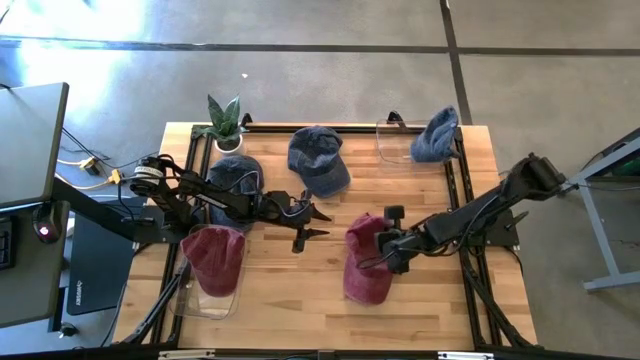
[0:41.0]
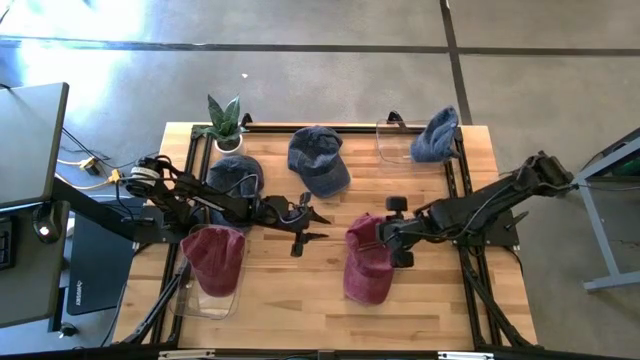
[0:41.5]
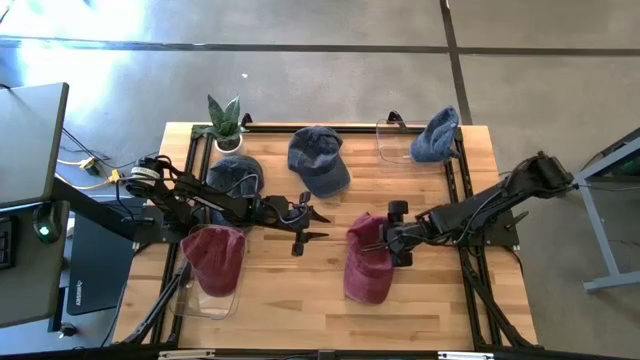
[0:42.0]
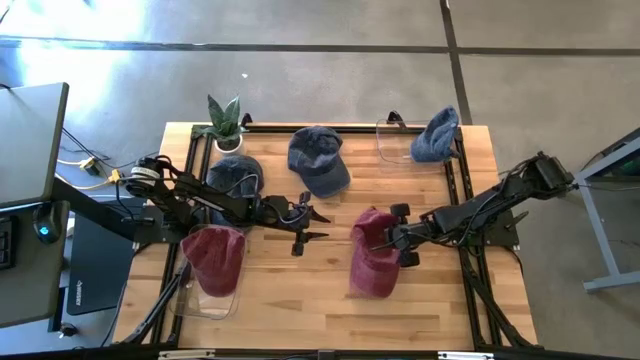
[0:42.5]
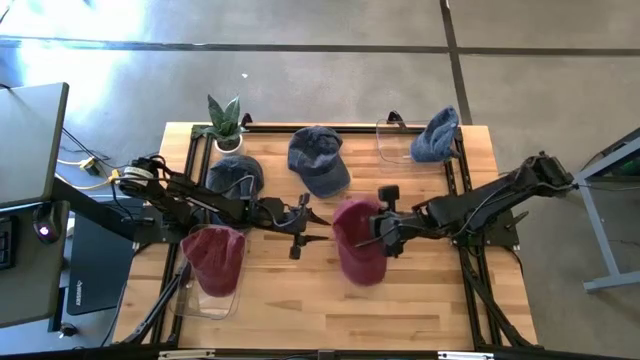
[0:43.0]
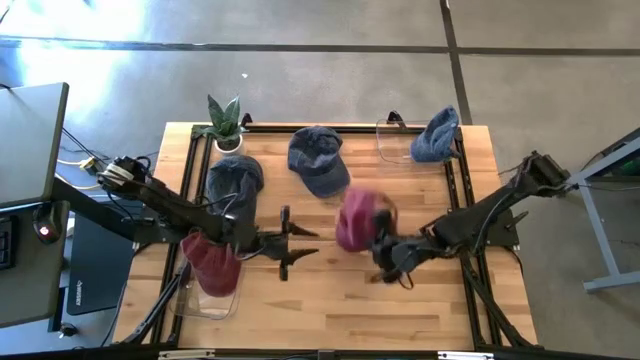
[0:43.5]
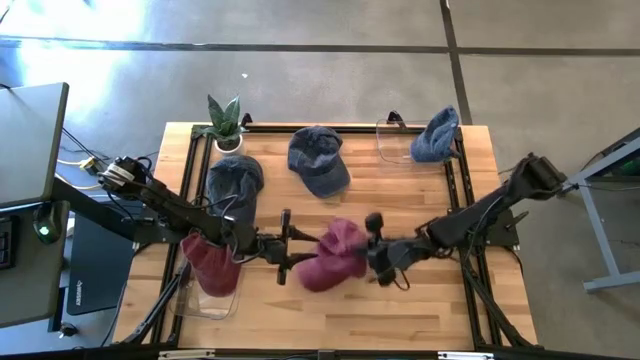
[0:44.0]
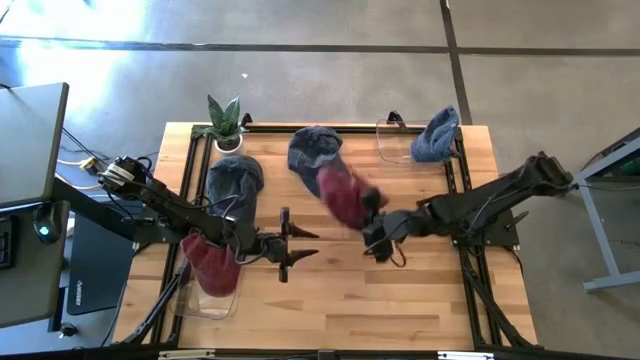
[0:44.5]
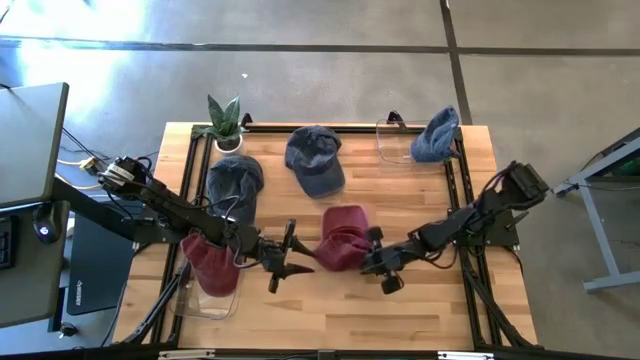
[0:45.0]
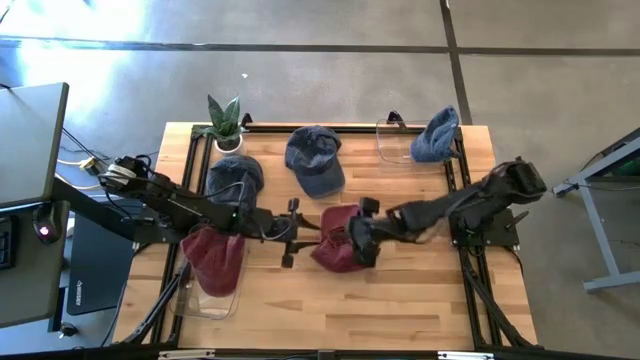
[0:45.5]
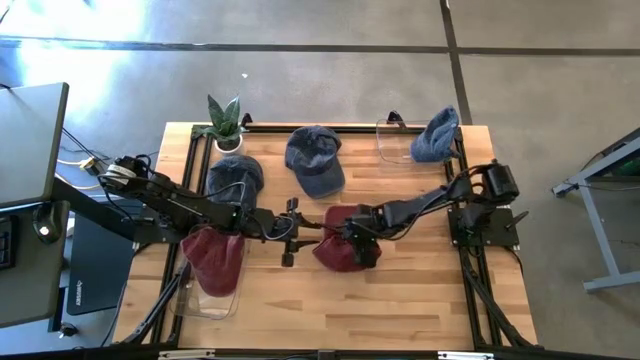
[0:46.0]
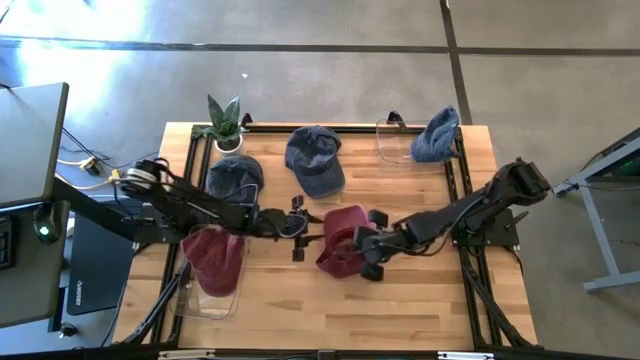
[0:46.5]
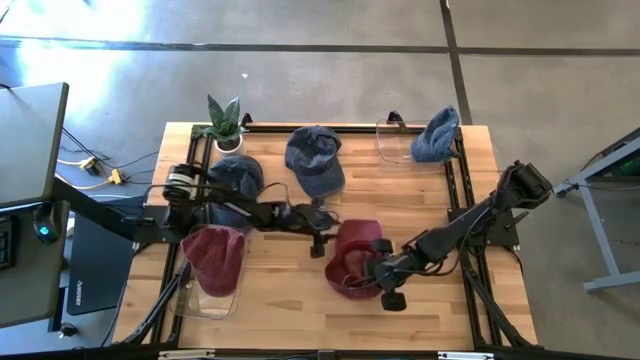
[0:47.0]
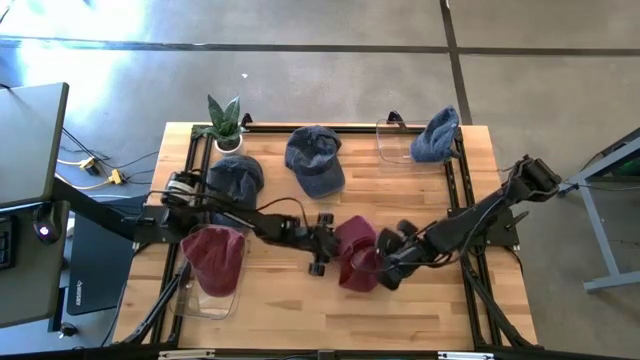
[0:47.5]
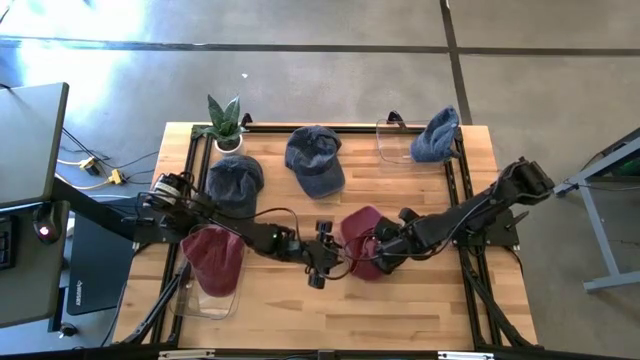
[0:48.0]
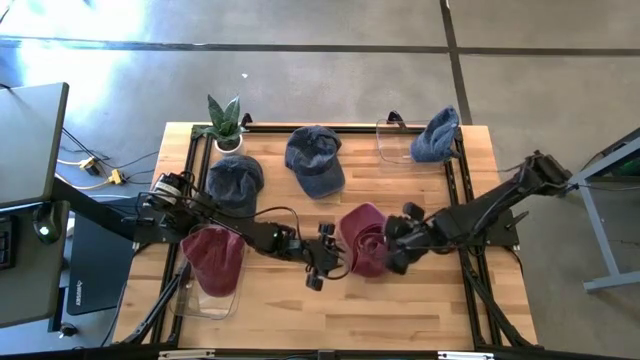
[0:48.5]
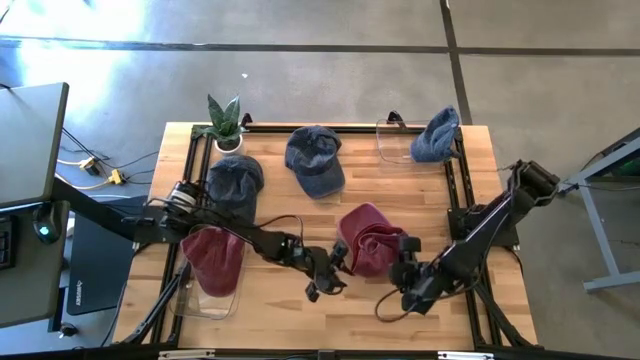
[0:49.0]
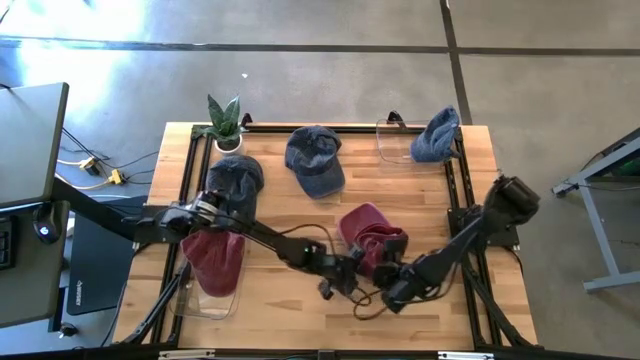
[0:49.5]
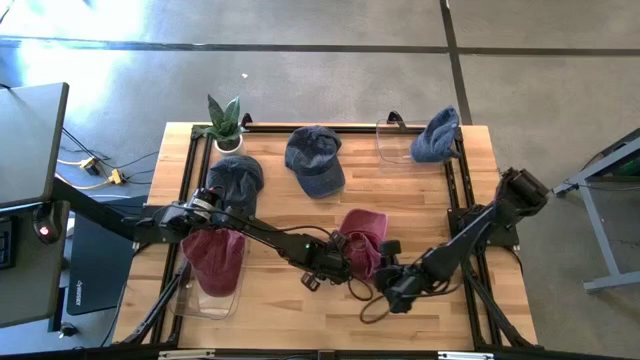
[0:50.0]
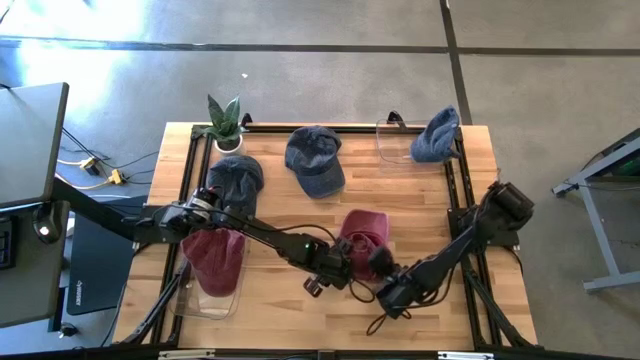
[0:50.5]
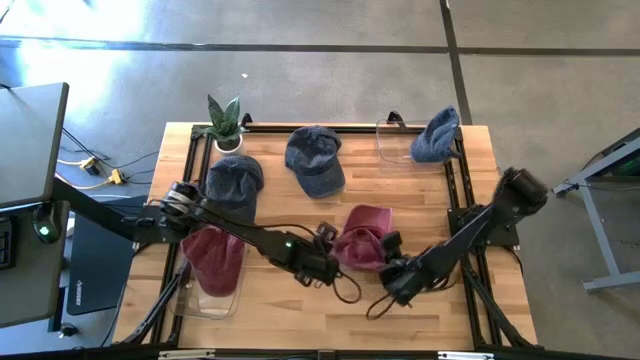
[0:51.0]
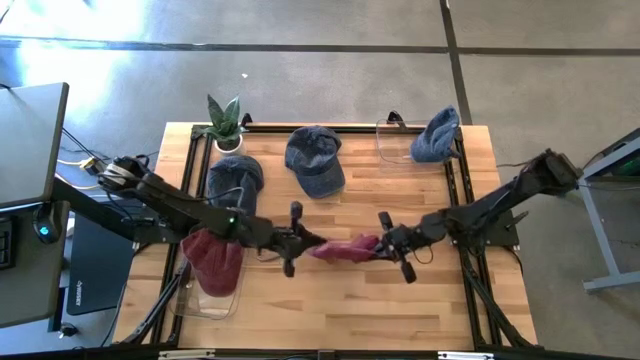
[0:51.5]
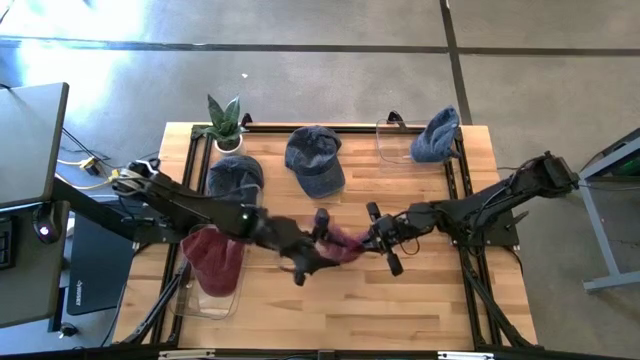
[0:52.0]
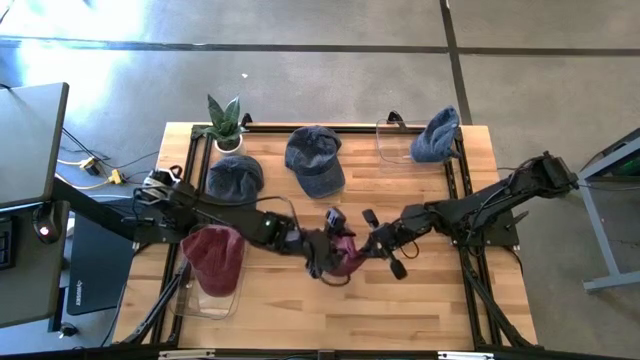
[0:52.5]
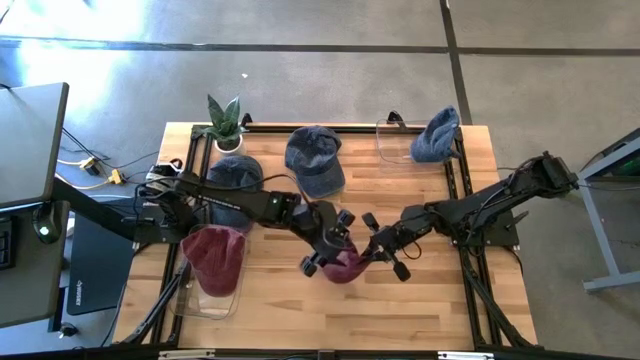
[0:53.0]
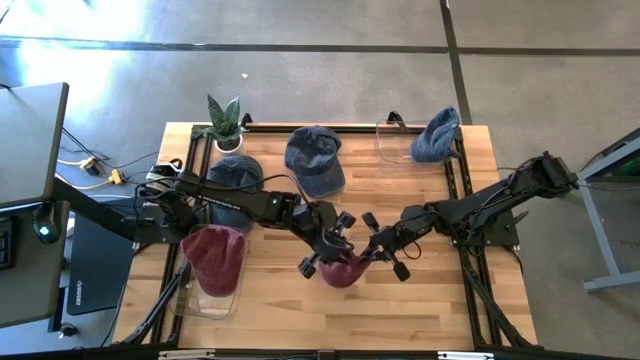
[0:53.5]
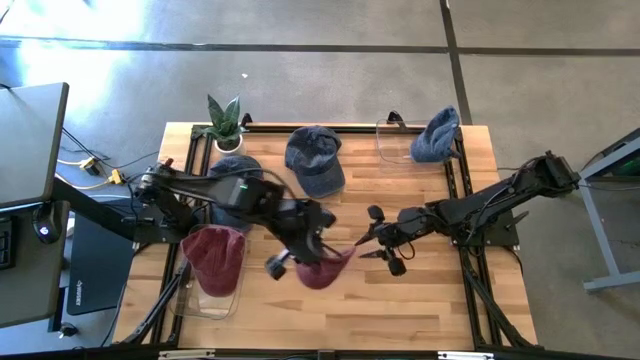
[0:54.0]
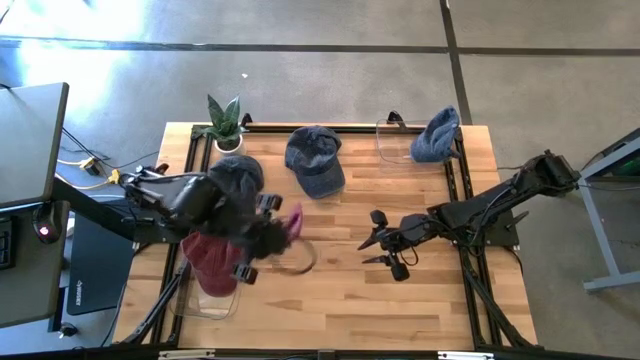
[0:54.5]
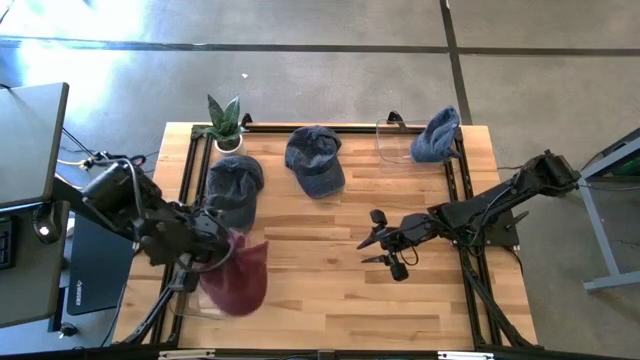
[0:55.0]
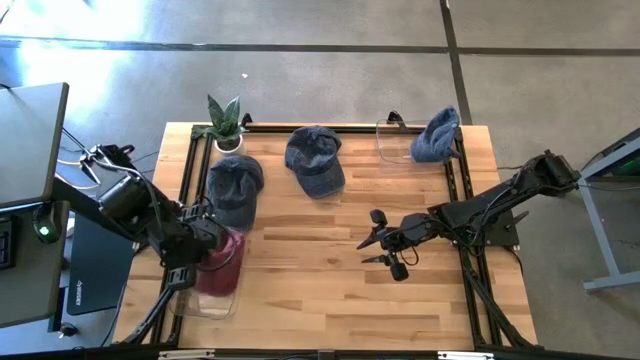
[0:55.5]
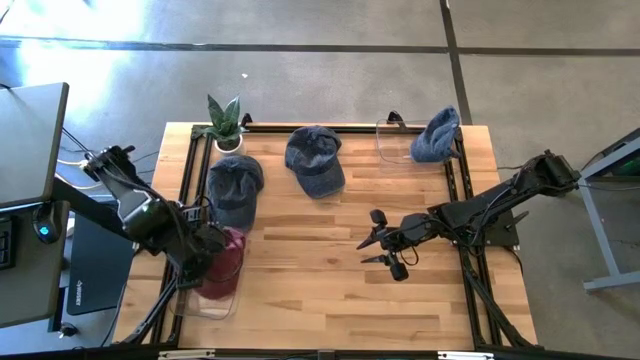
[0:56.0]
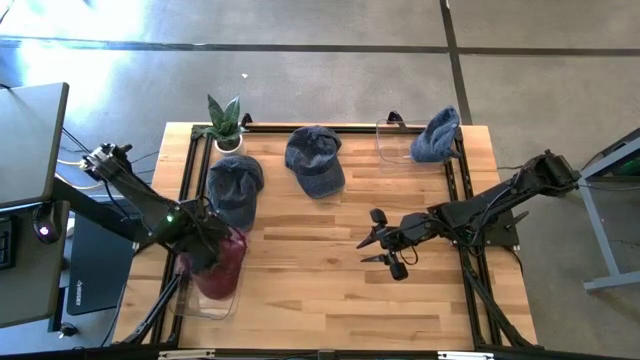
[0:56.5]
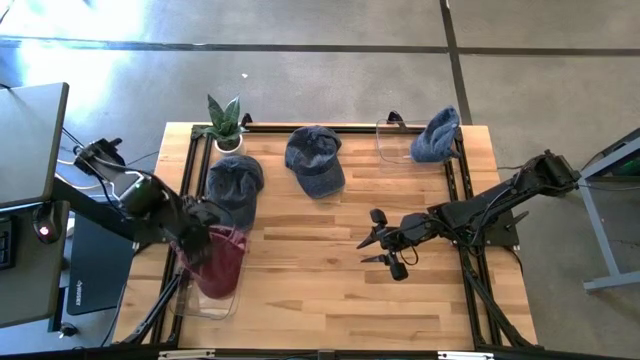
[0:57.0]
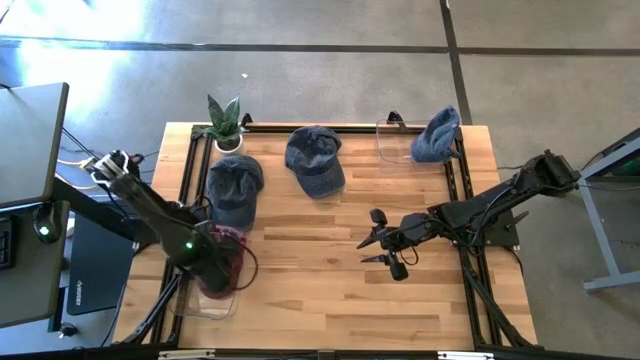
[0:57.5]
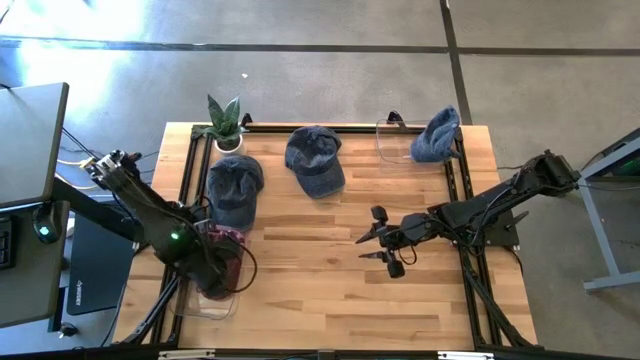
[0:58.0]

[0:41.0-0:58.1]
Task: Pick & Place hat
Put the red cap into the bottom transparent bin

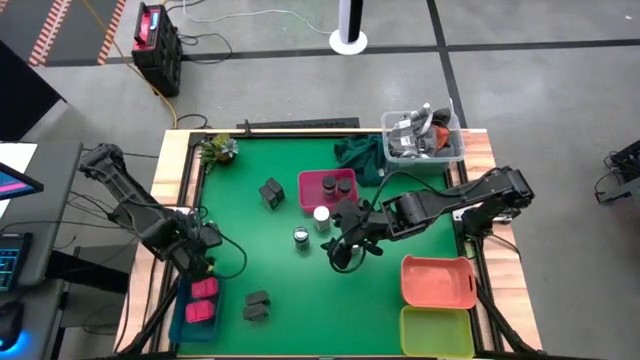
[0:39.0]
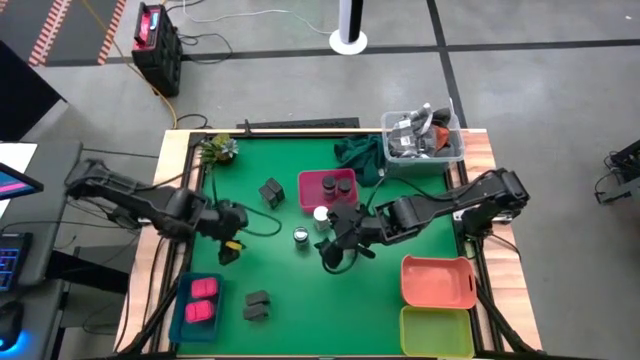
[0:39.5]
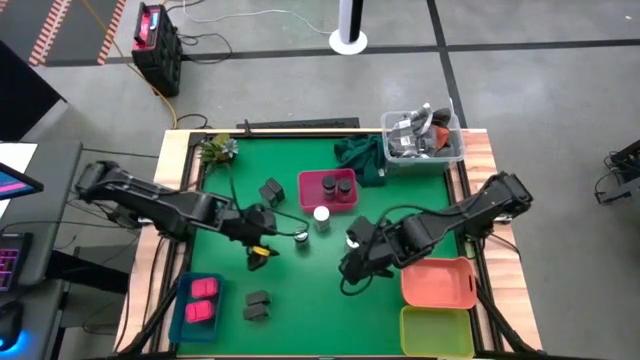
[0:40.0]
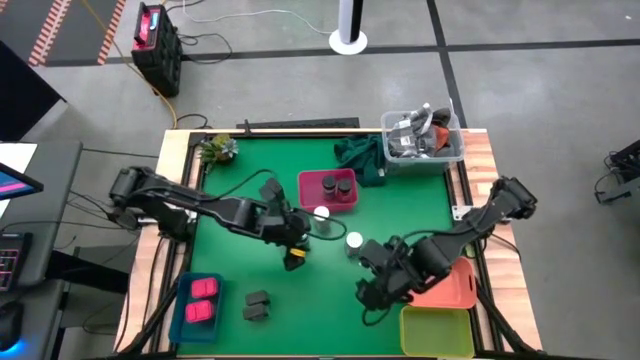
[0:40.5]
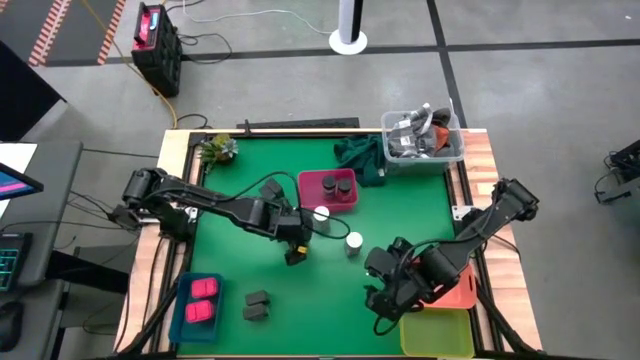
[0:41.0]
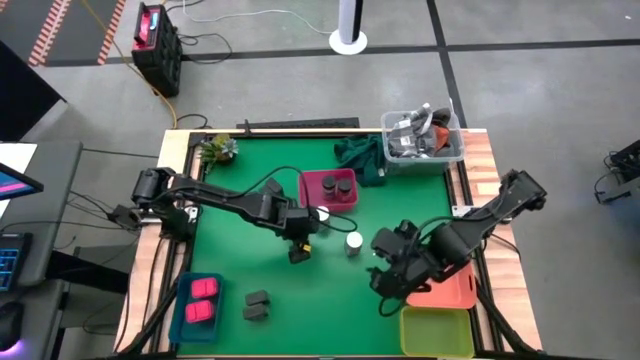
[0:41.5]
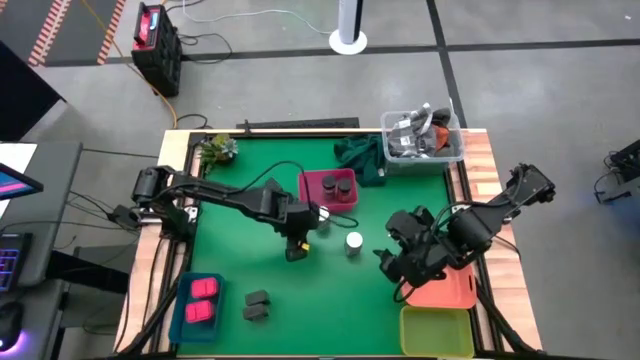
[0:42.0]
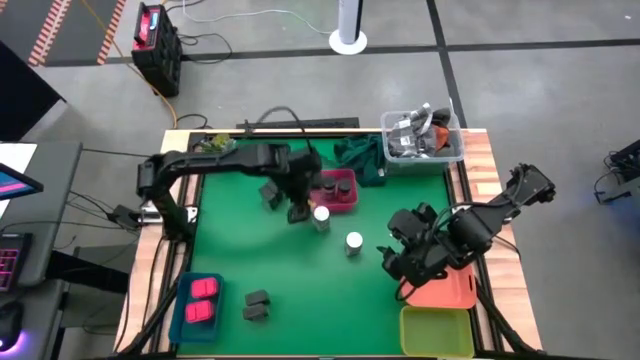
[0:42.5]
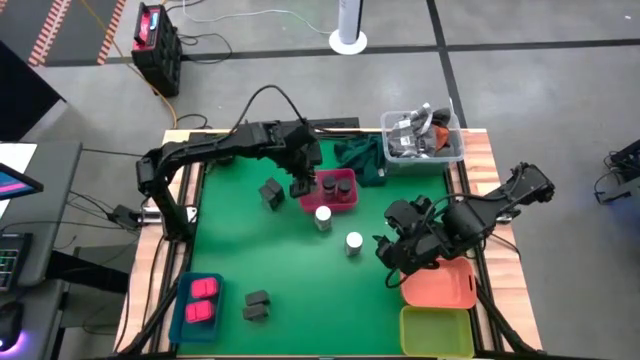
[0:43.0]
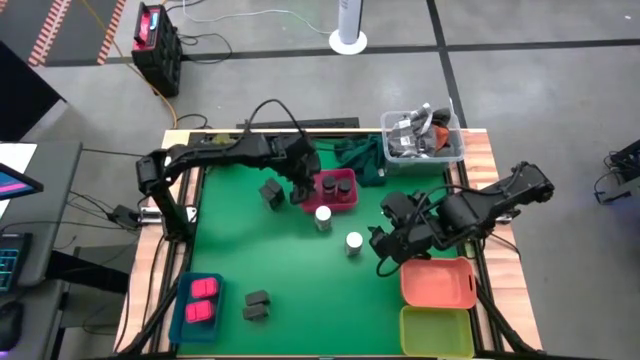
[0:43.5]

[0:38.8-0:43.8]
Task: Sort spices by type
Put the black seasoning bottle into the red bin
